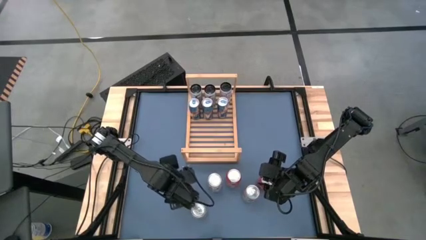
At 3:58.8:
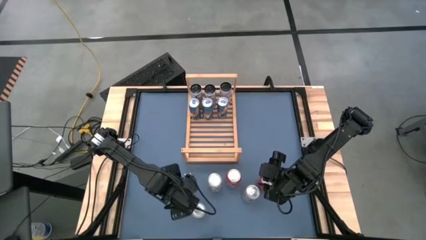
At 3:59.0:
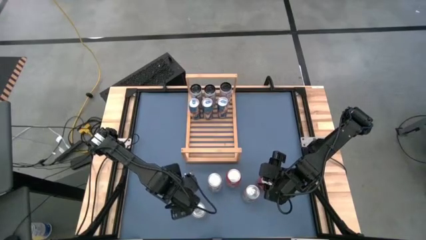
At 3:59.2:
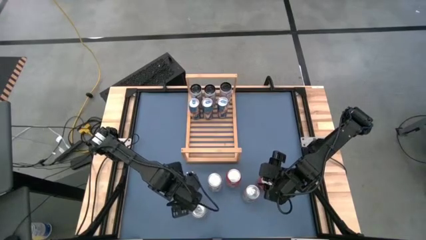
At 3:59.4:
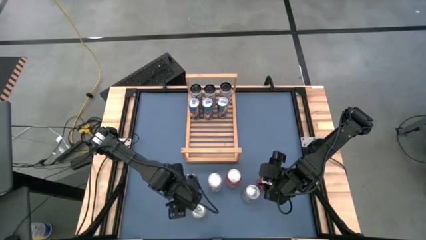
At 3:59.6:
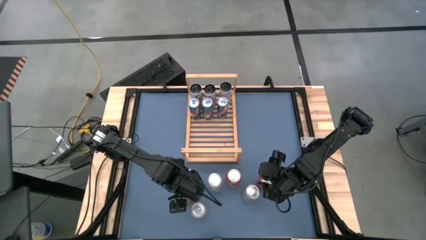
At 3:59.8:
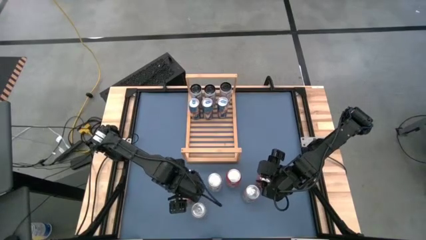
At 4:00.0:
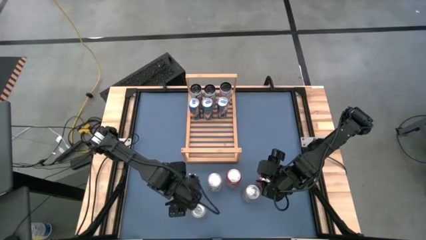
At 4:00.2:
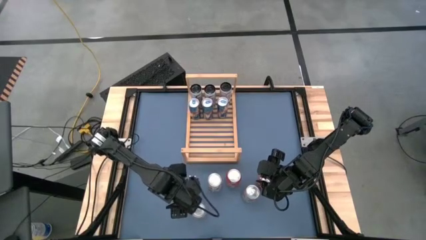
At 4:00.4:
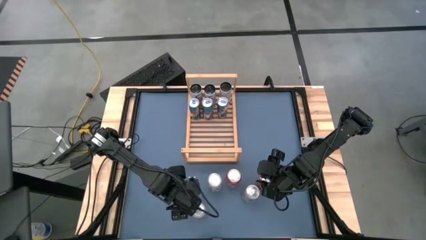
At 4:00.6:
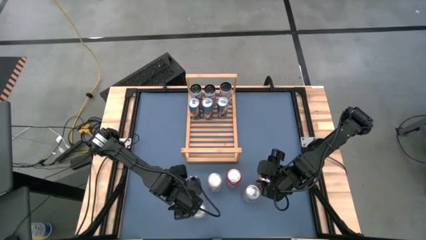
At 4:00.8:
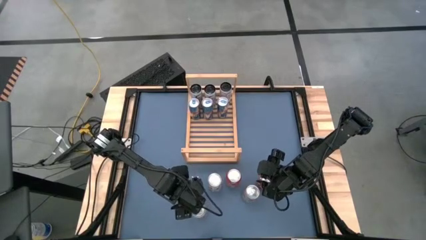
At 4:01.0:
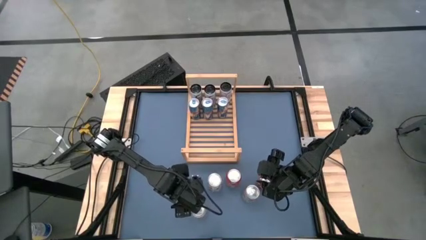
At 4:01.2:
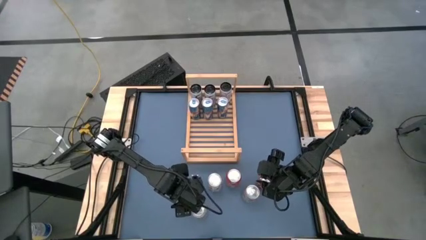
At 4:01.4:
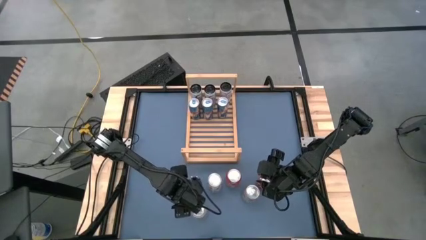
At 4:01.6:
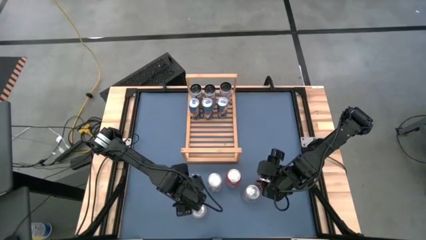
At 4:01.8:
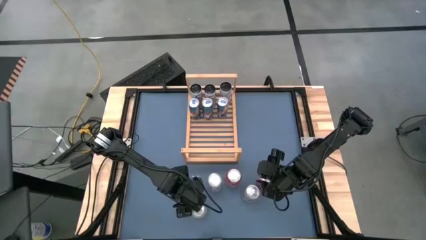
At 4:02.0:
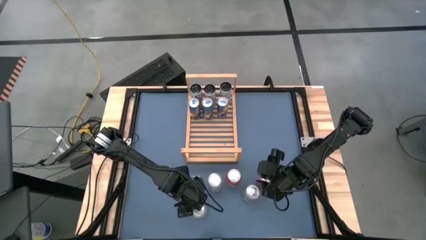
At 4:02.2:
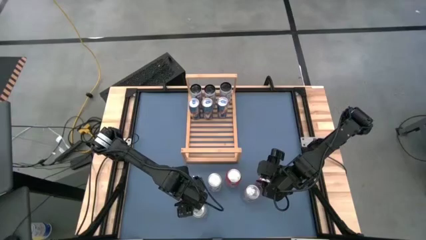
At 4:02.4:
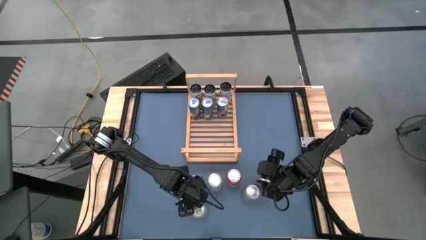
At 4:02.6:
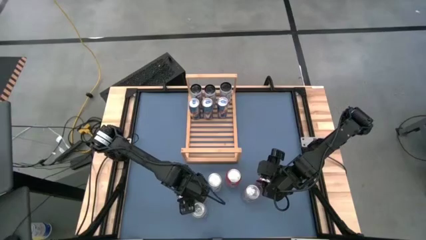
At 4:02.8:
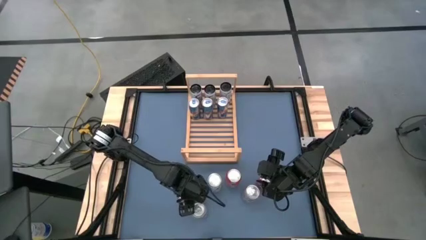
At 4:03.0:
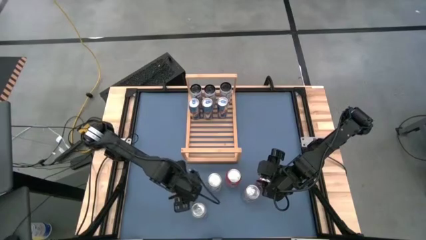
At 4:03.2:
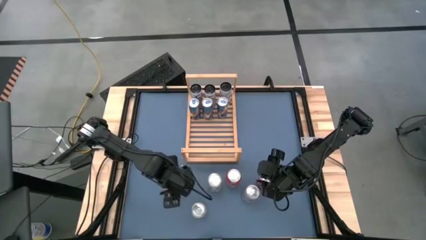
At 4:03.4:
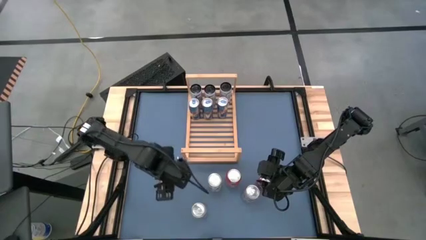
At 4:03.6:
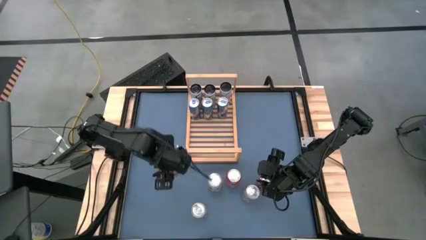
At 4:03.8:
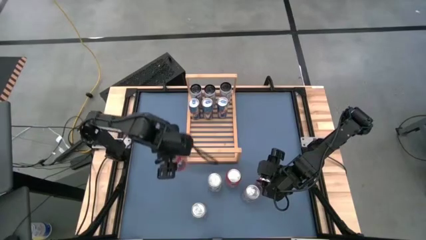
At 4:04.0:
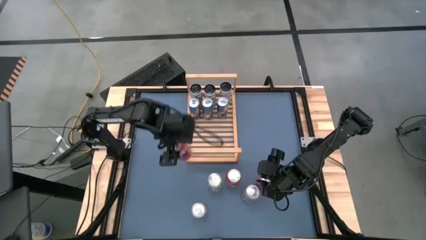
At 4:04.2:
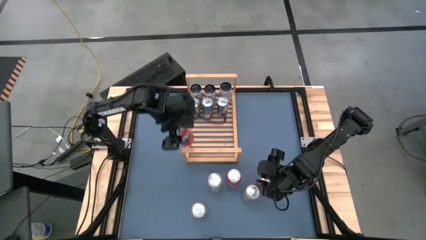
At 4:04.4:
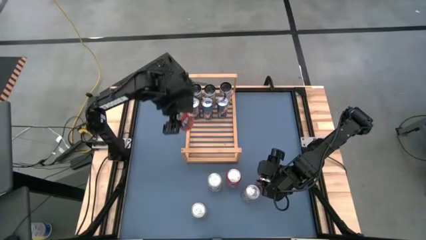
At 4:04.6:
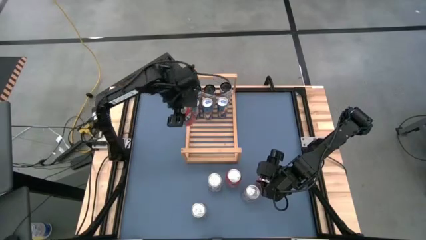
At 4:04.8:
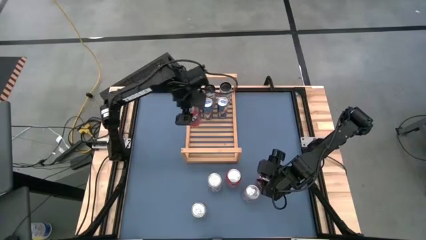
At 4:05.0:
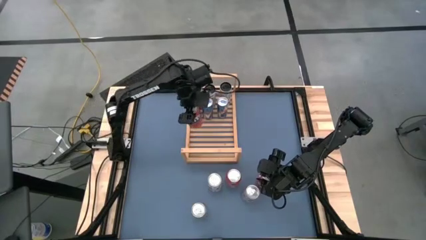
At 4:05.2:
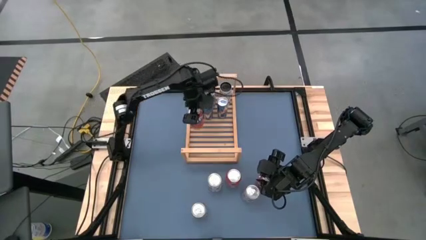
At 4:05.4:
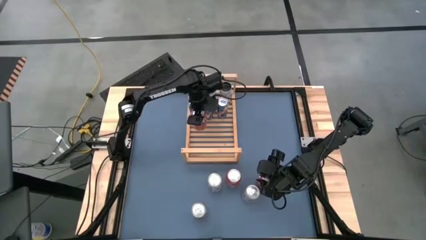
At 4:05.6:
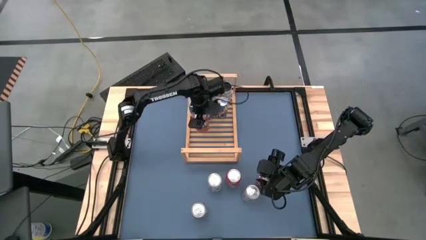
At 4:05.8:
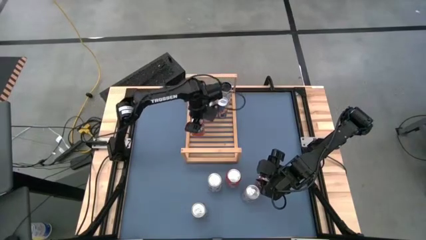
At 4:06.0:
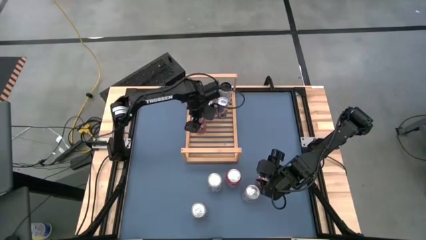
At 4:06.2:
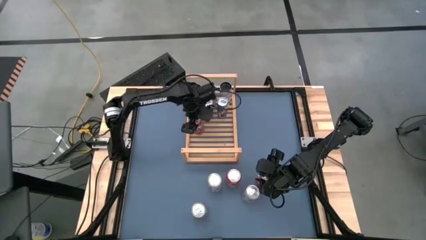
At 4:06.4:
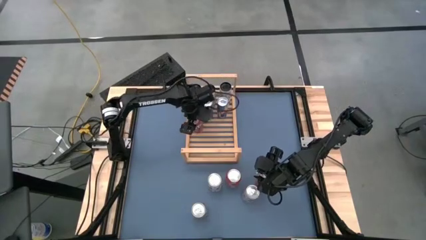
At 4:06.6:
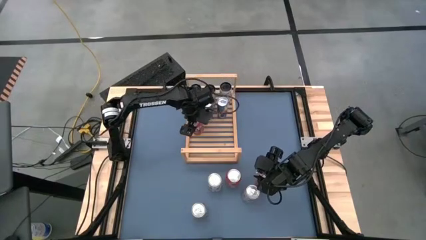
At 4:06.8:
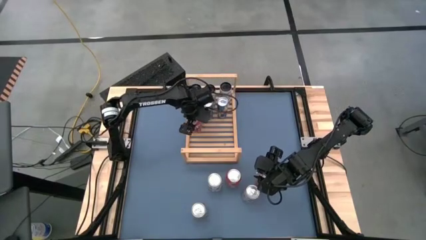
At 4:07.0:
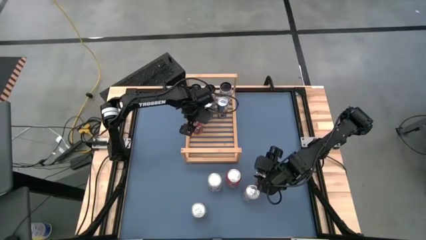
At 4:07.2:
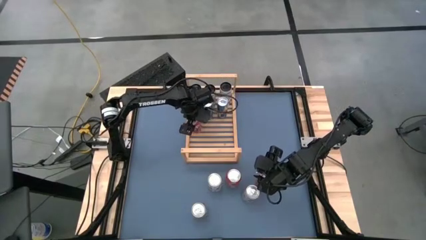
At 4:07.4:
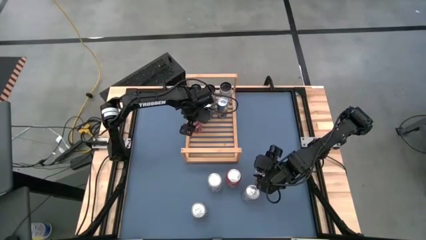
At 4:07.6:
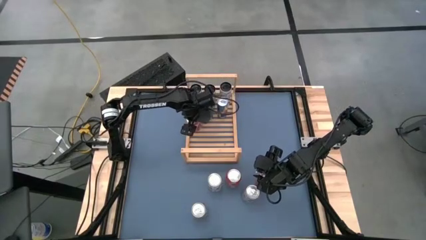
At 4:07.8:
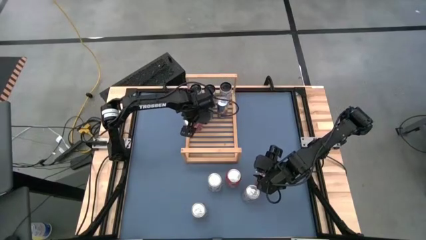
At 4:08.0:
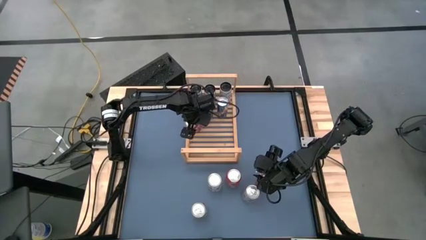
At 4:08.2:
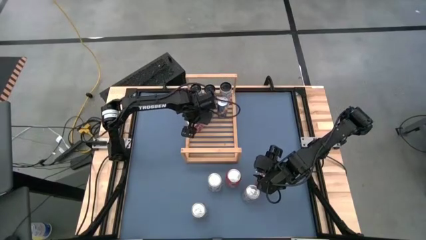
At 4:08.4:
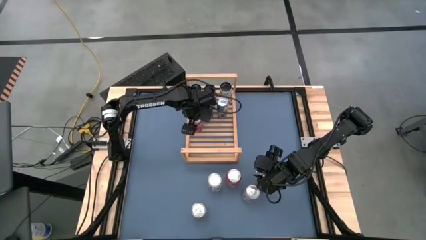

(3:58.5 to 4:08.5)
Task: Place canned beverage on shelf
Put the left orange soda can on the shelf

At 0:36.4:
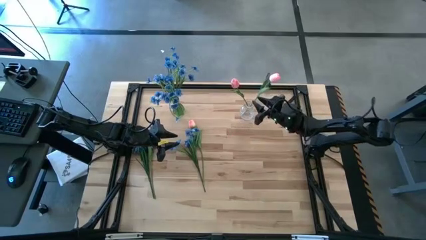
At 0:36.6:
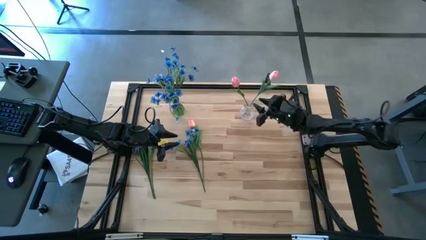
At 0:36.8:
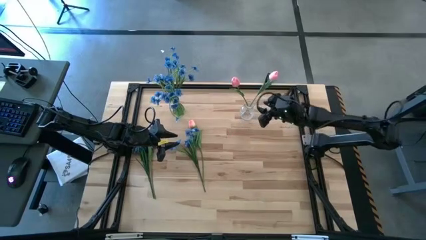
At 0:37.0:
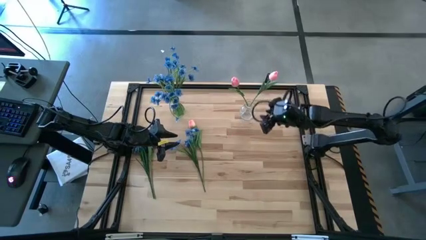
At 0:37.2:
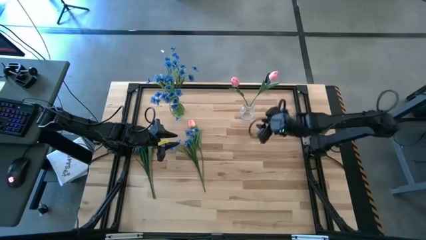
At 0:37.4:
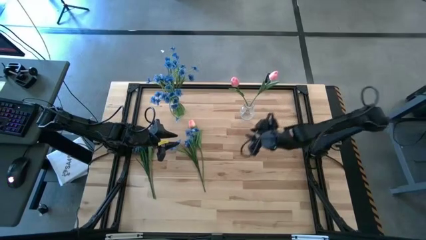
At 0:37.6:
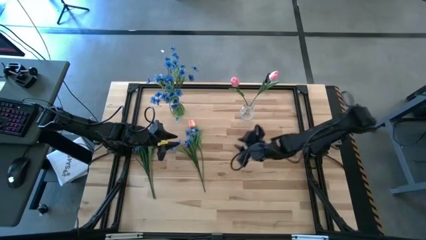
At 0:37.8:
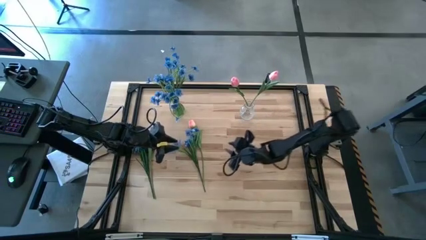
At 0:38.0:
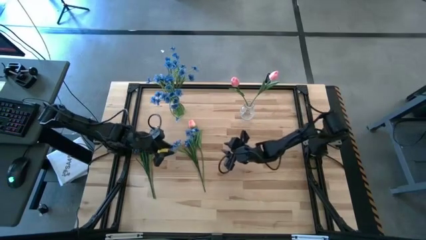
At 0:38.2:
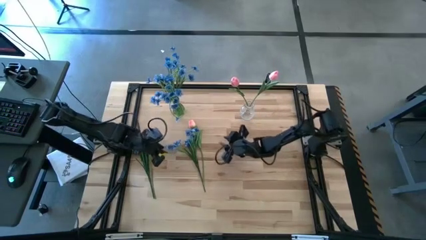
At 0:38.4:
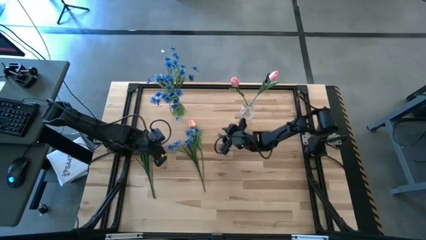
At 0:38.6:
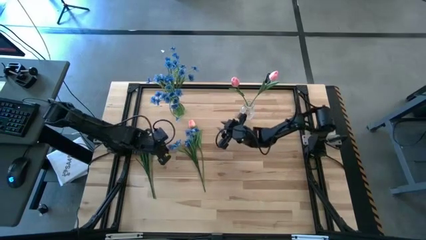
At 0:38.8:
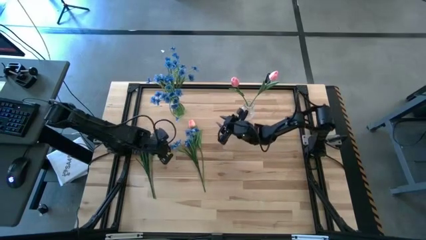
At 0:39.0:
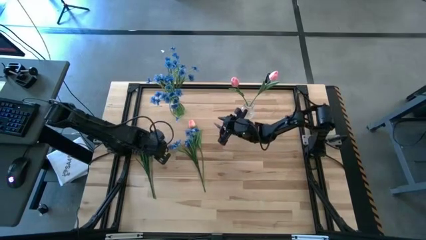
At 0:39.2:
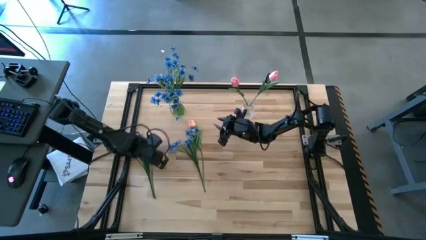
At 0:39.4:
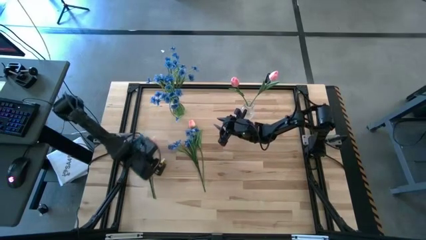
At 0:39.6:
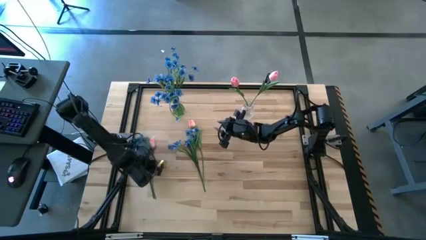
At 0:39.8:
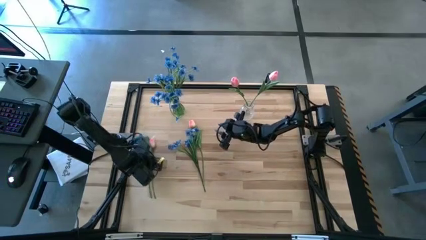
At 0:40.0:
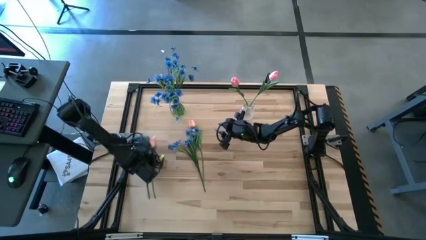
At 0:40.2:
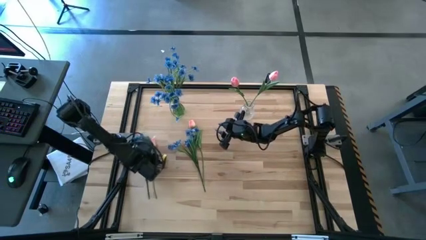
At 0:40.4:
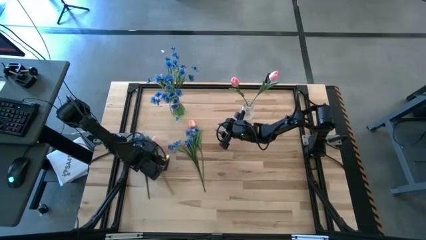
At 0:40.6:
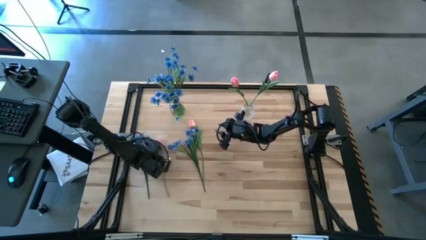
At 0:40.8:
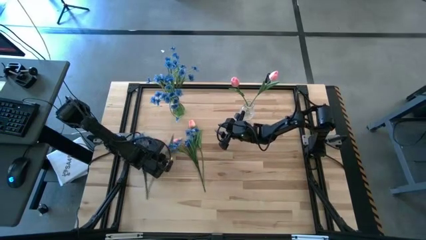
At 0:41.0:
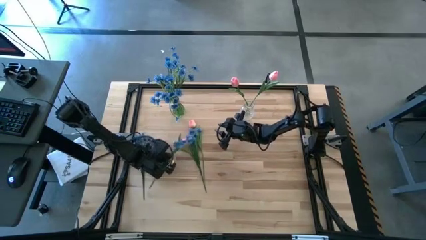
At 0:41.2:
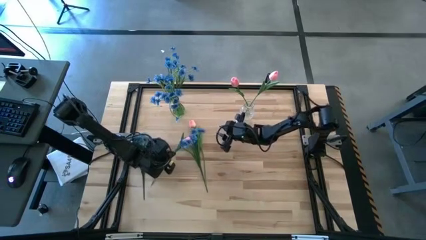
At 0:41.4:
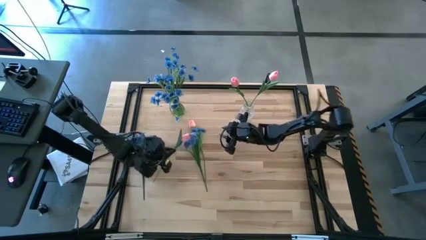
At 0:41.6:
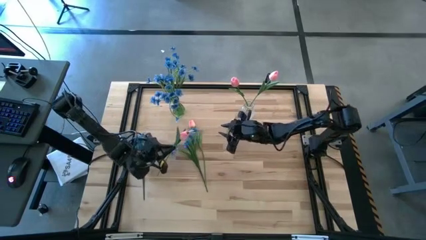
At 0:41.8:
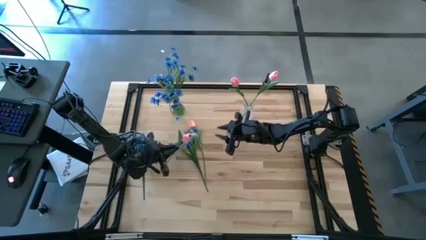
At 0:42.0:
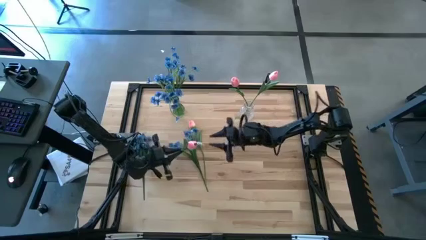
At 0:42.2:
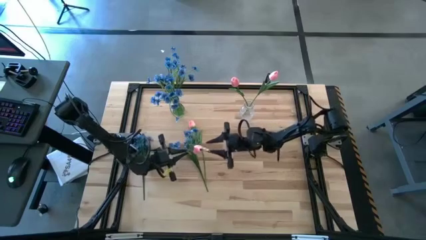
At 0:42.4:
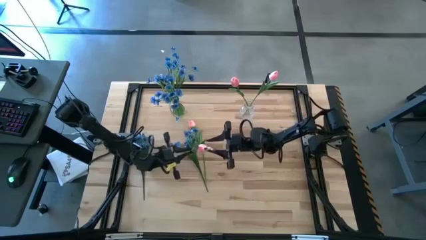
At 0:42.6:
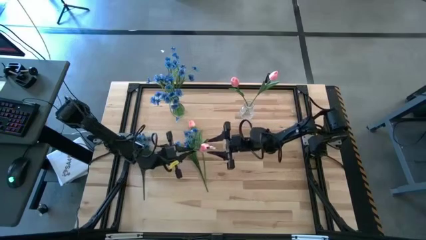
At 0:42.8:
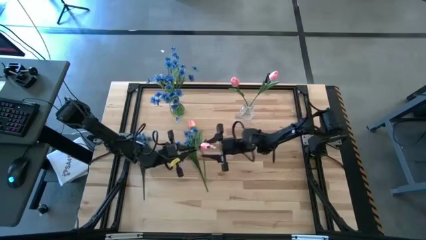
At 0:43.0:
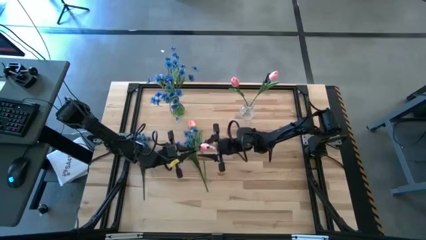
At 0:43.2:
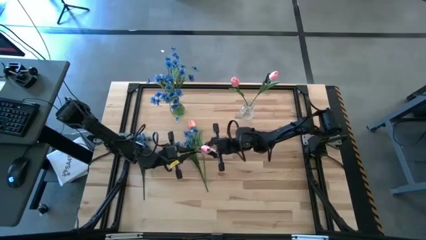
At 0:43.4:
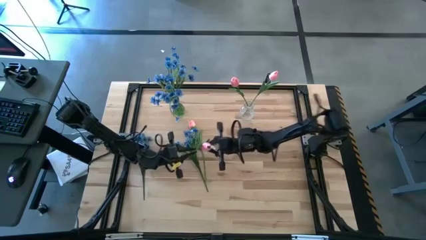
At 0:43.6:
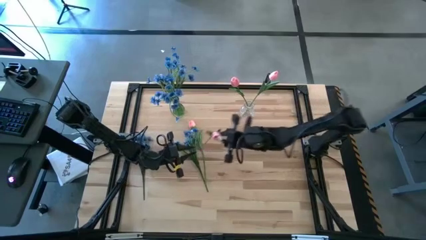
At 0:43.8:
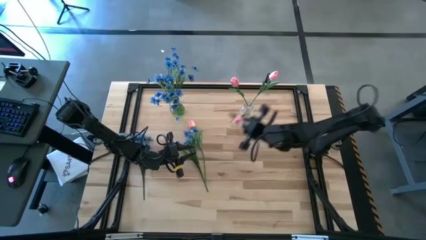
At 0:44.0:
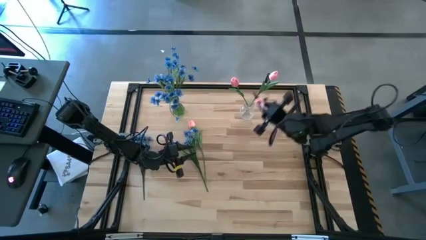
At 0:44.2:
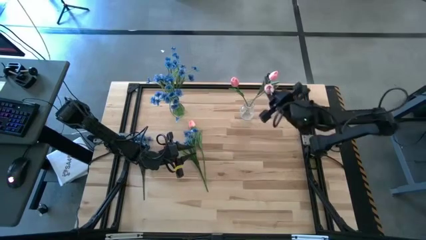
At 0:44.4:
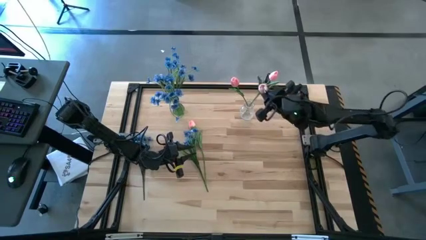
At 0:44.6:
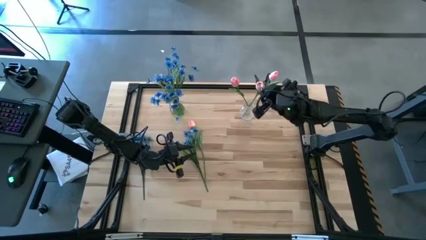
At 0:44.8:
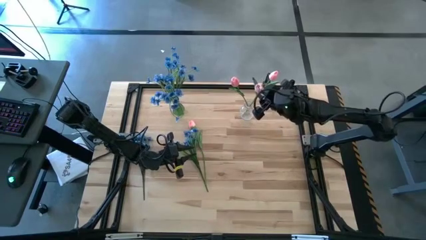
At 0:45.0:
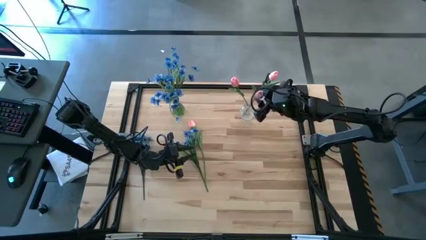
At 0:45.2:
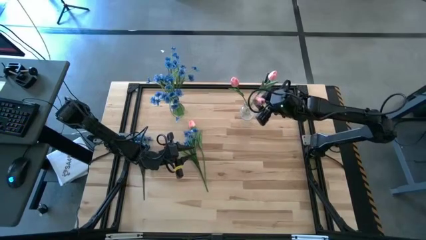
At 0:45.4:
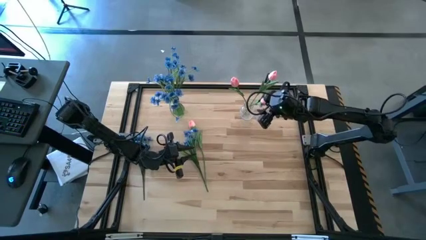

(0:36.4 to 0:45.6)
Task: Sort flowers into vase by color
Put the bottom pink flower into the transparent vase
